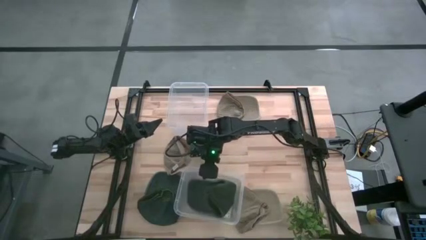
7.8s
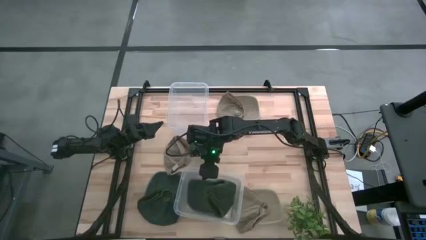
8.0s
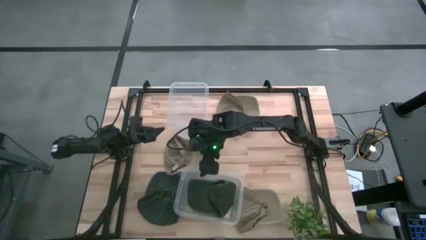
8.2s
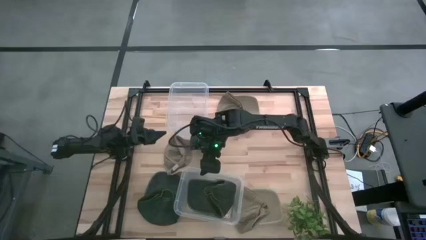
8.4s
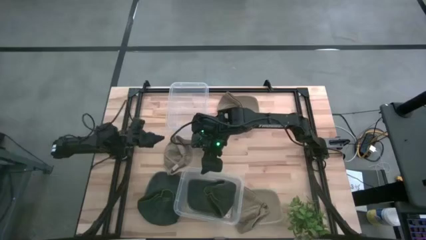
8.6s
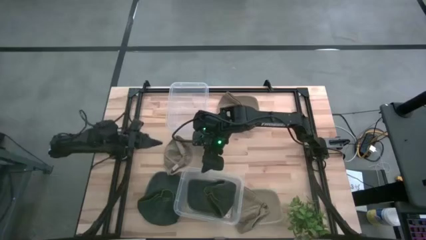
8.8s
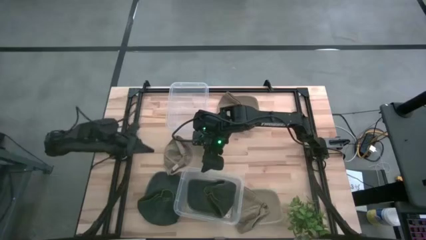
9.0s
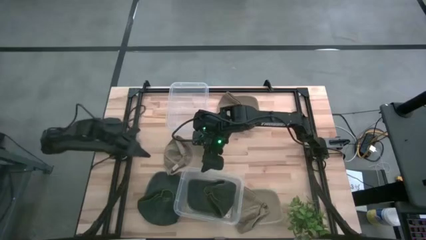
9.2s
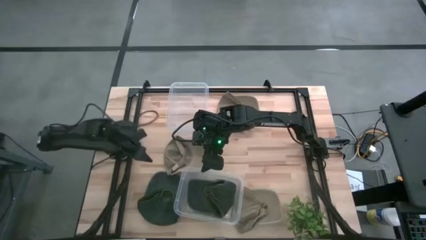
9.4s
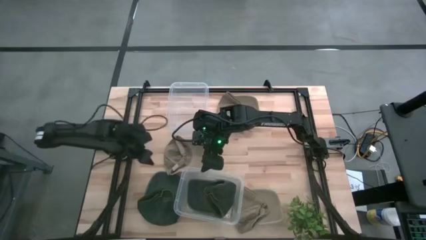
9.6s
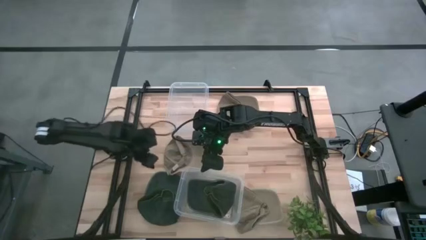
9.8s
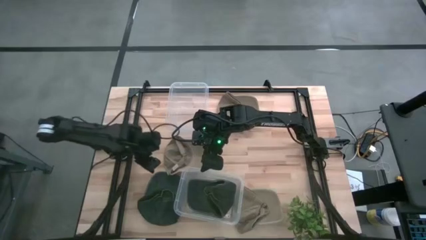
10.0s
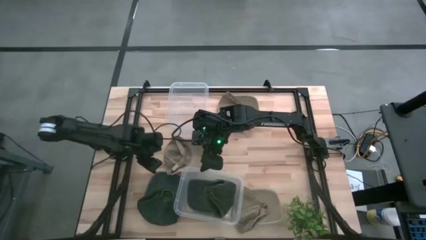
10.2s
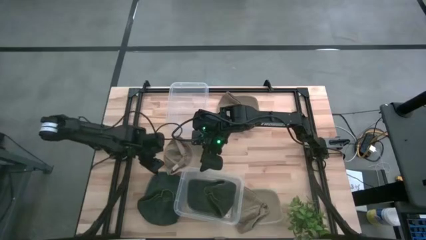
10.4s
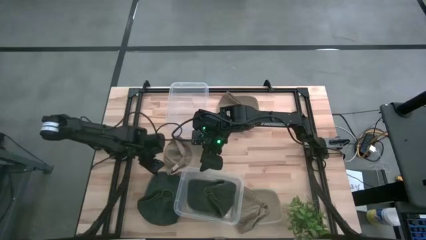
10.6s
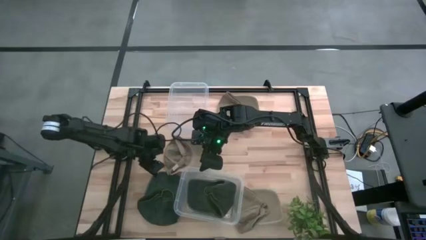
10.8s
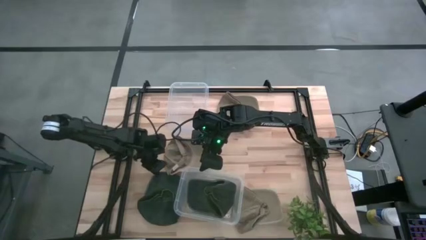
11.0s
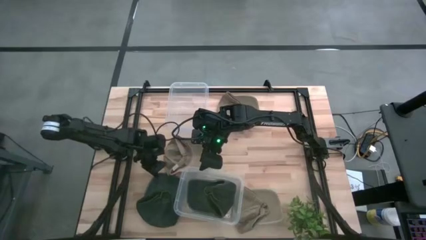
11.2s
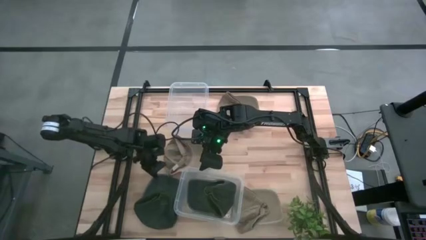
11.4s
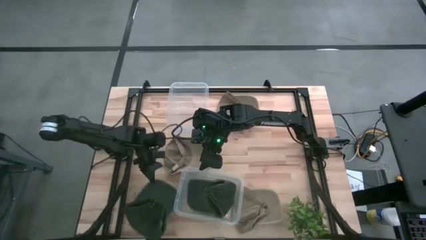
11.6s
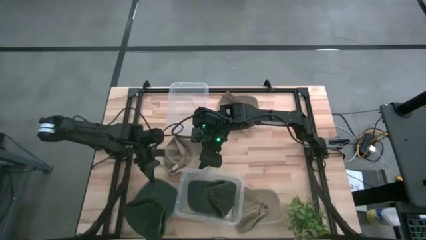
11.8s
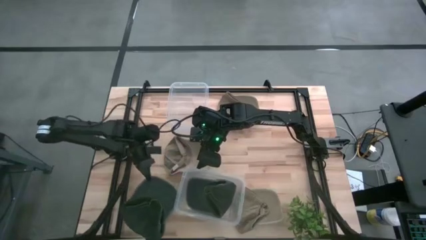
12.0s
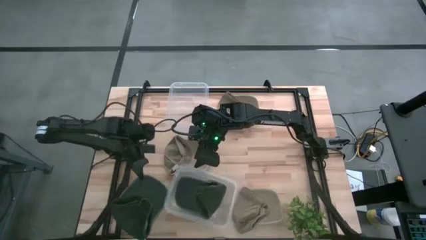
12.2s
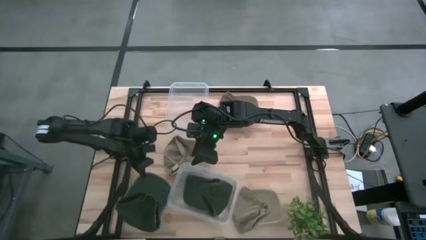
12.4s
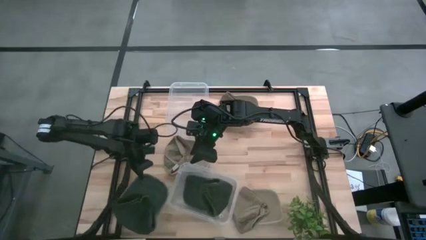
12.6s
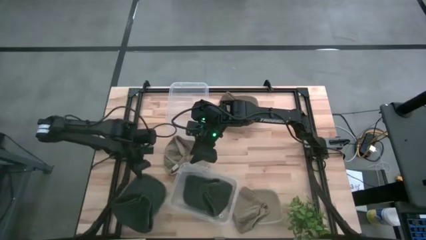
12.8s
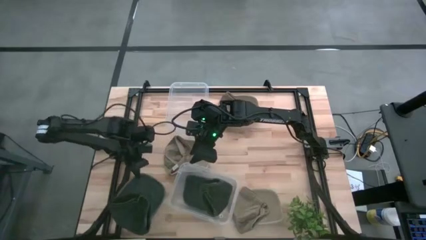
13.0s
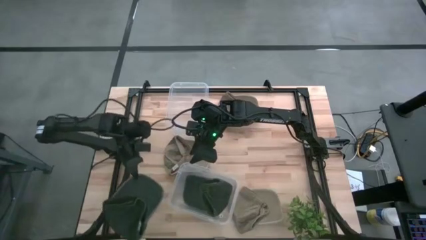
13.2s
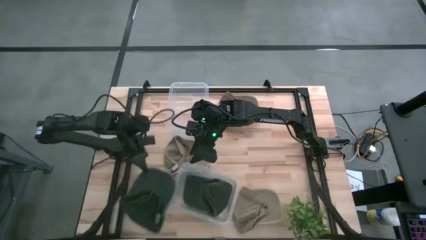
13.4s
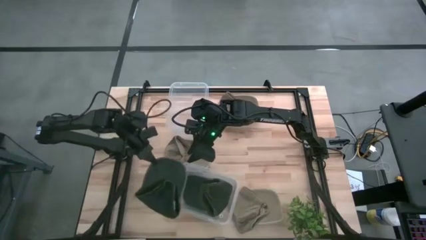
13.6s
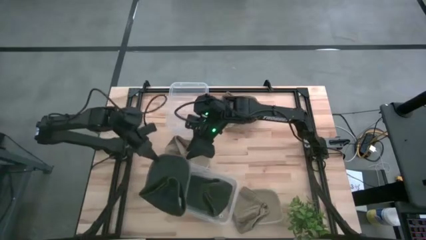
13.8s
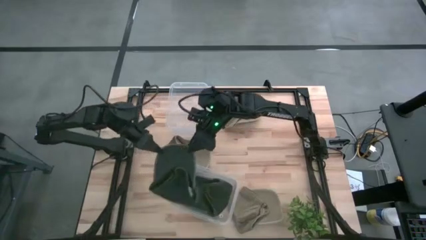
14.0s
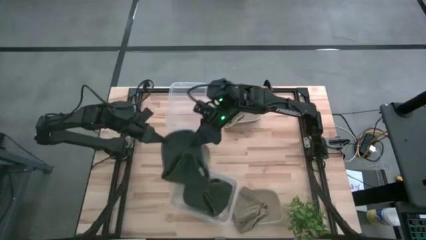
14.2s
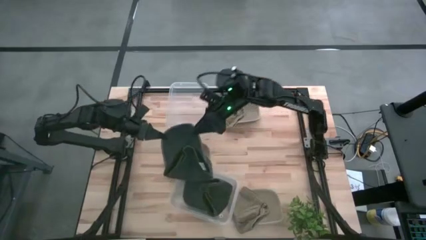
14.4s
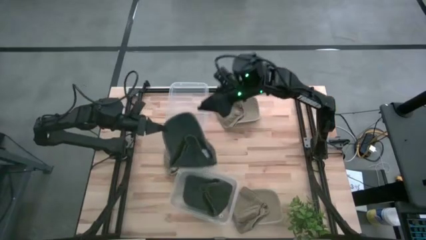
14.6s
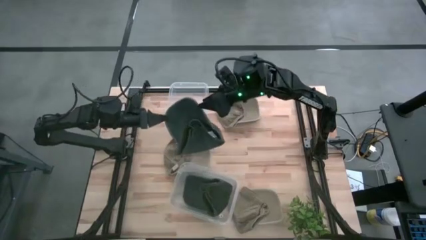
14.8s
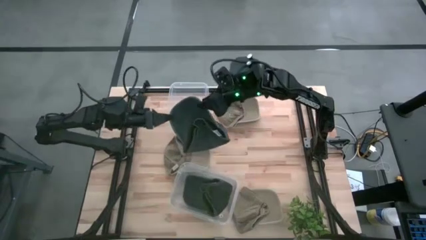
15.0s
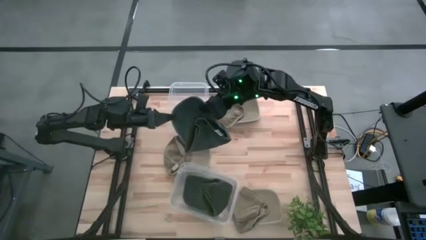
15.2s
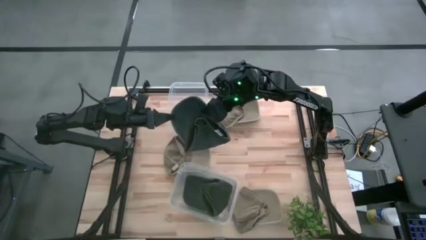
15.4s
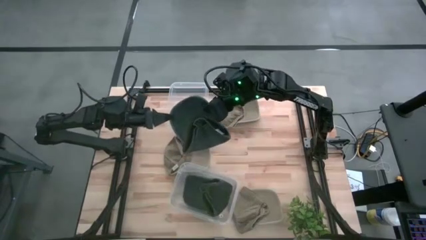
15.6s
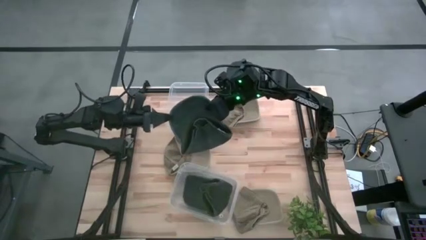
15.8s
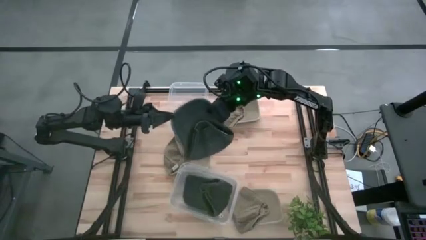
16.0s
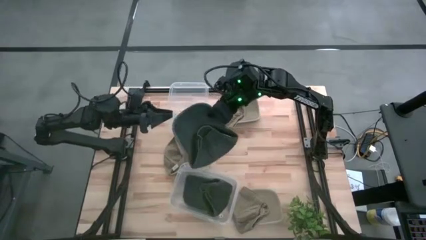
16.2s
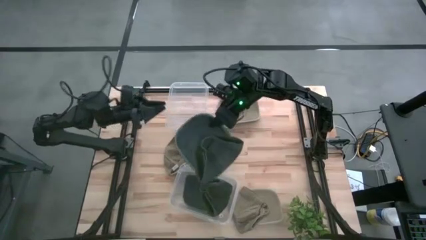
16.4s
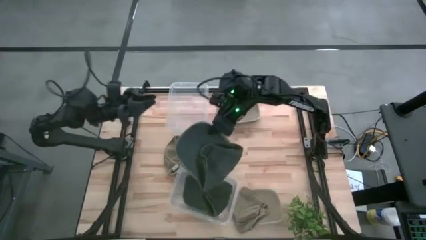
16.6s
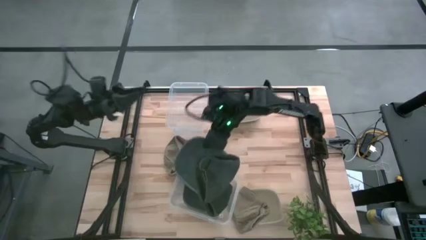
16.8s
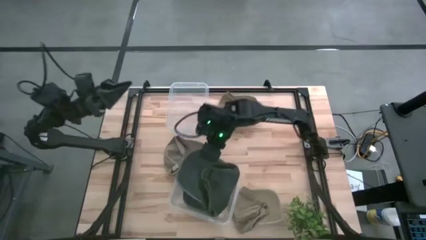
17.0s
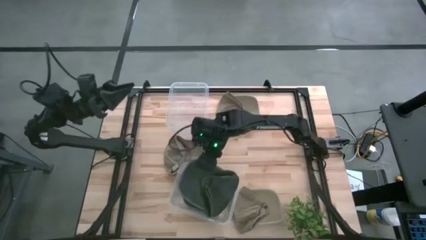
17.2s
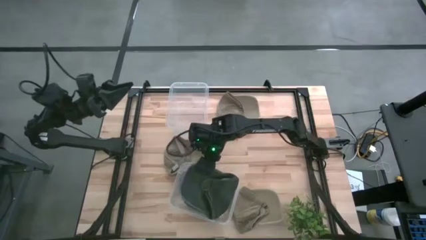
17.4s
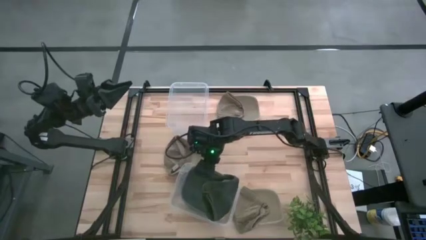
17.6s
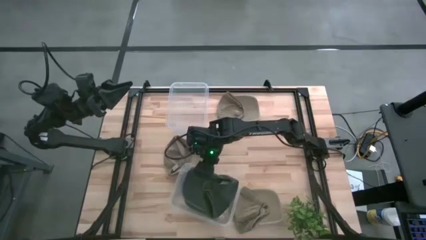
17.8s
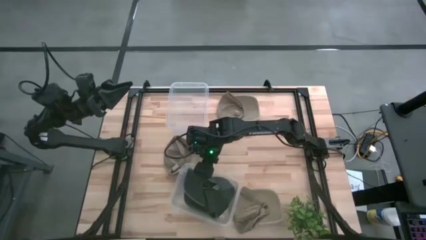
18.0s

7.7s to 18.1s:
Task: Pick & Place hat
Put the blue cap into the bottom transparent bin

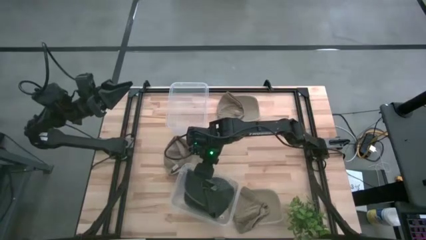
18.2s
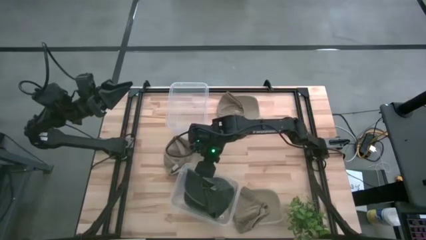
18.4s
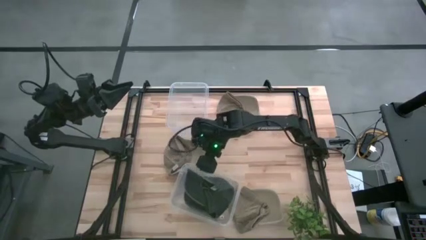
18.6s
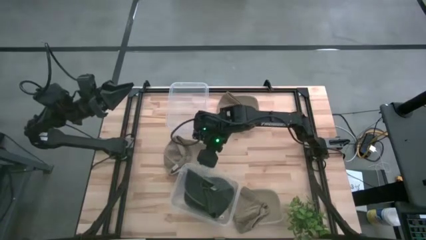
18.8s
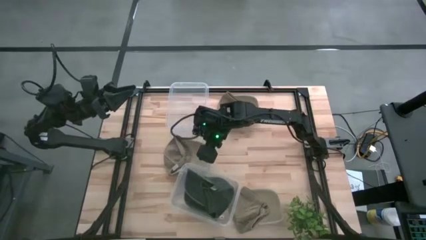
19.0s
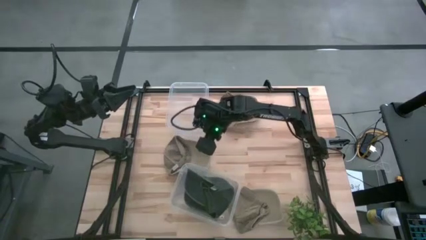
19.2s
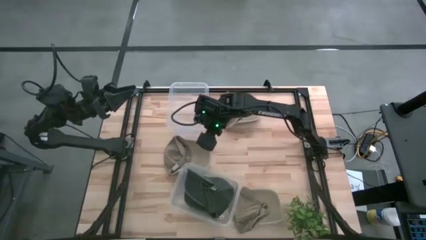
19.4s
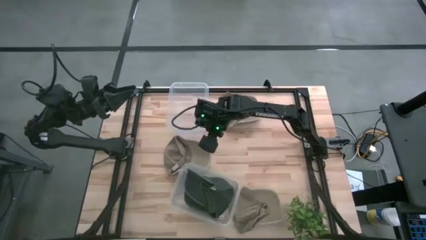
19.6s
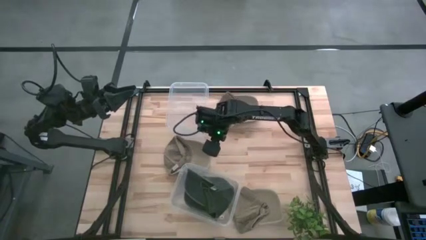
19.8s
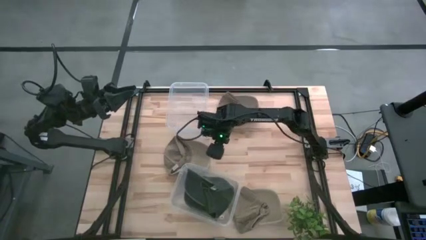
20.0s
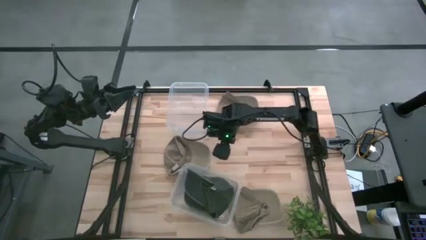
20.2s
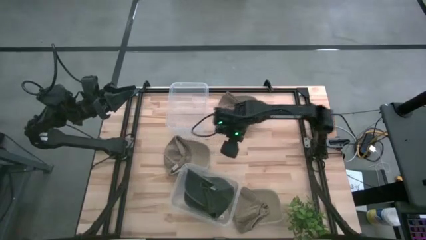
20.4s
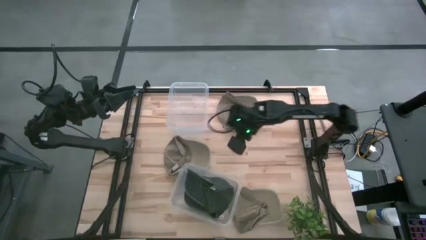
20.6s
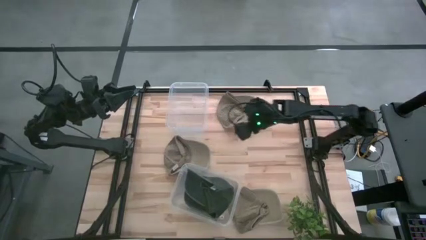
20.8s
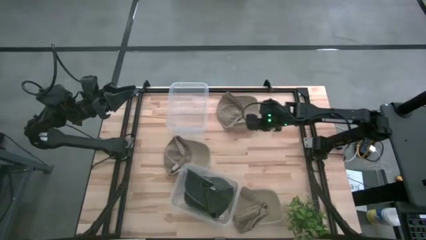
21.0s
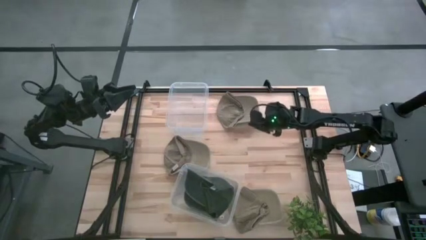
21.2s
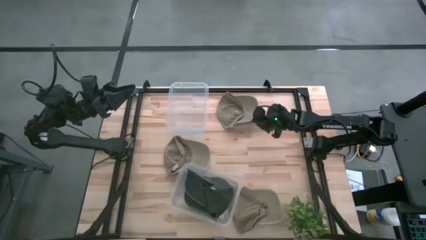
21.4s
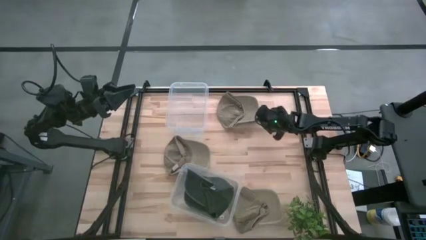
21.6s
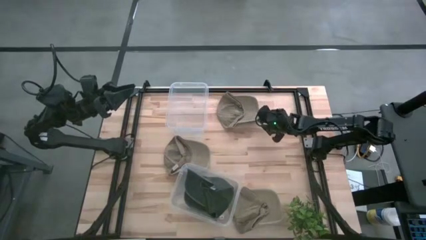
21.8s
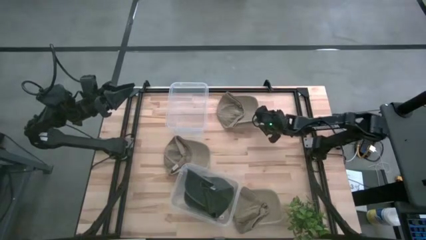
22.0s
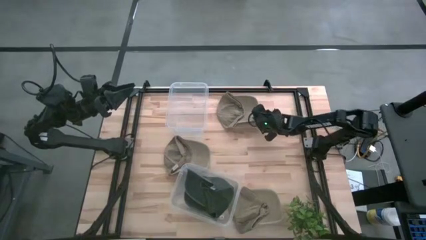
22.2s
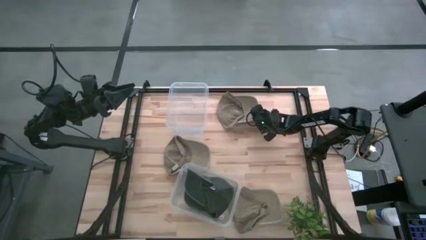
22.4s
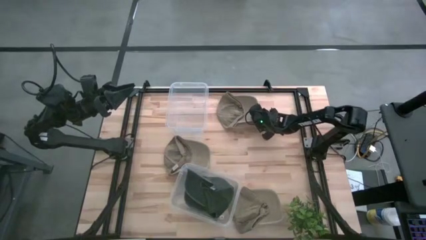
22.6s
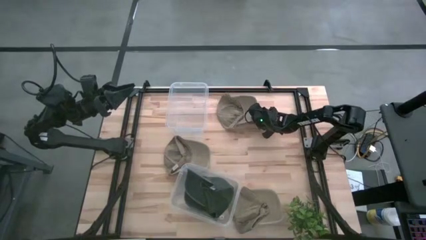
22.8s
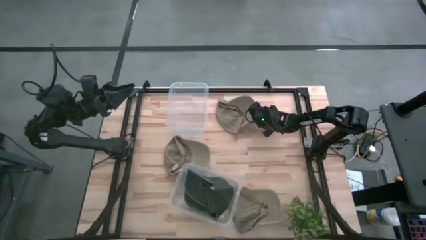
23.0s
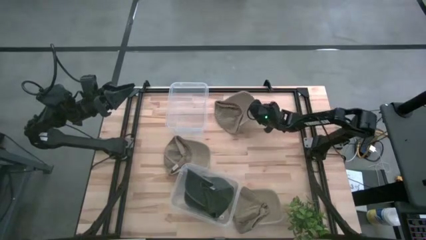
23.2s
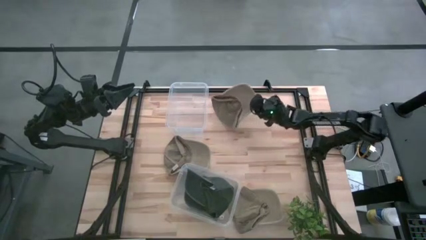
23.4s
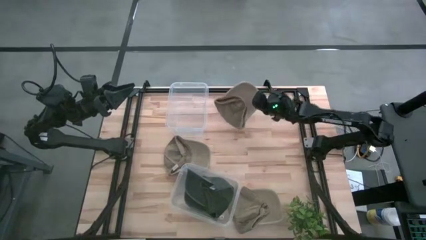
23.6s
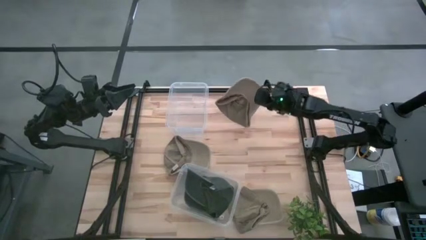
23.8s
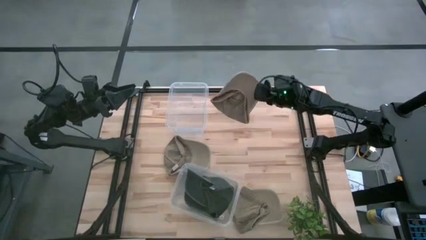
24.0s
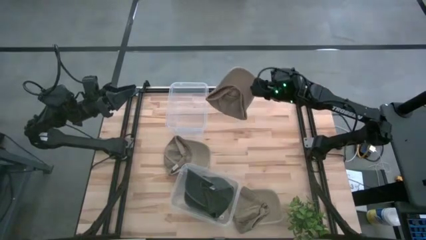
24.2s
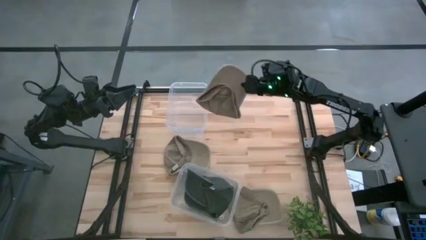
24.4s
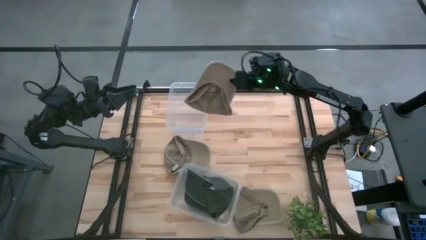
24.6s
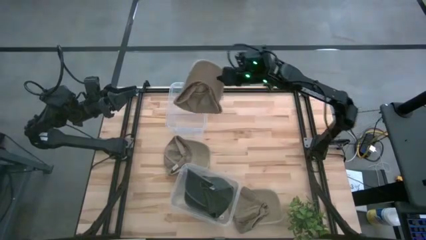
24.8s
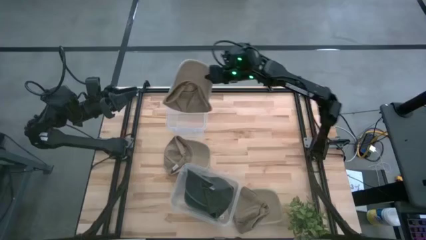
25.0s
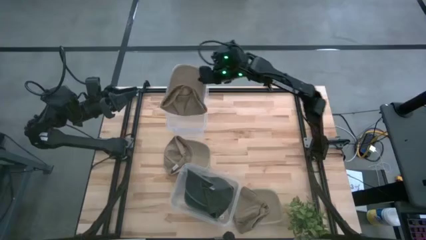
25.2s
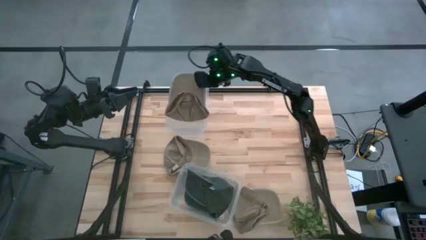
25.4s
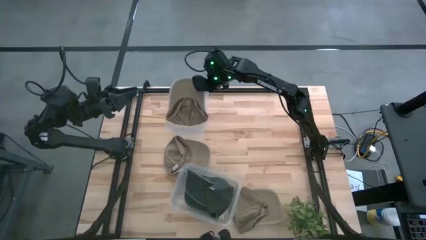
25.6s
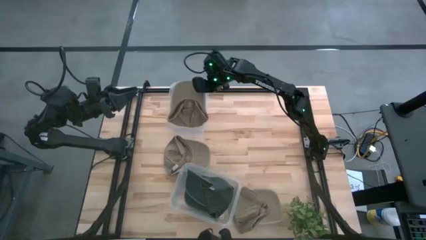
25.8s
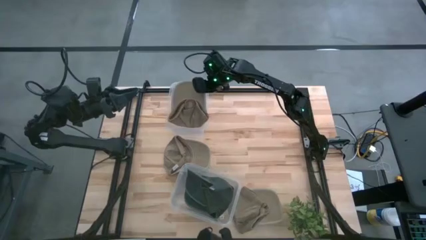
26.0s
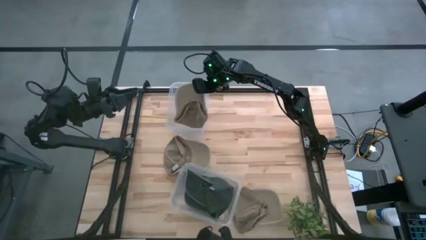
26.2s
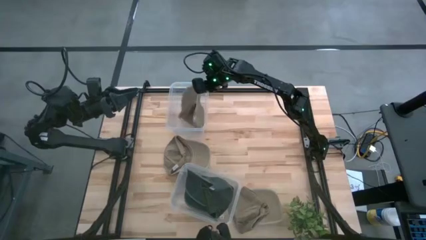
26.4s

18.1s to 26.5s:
Put the top brown cap into the top transparent bin
